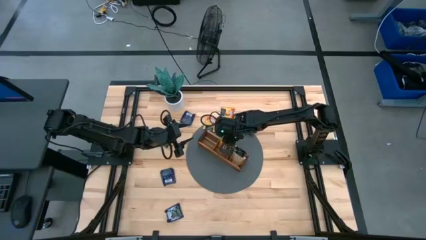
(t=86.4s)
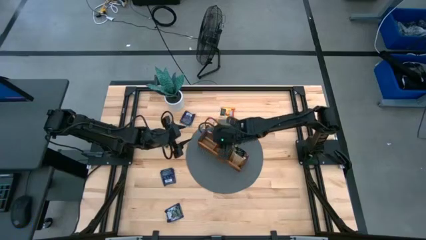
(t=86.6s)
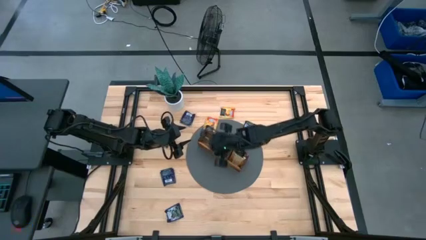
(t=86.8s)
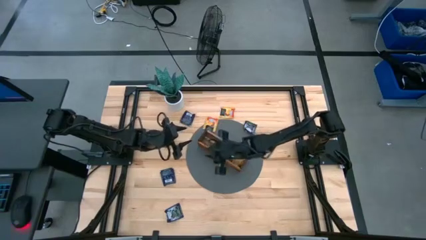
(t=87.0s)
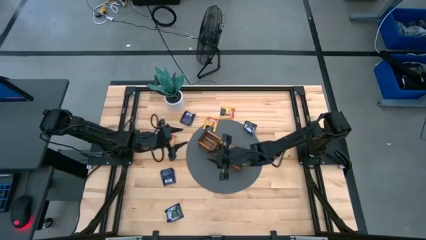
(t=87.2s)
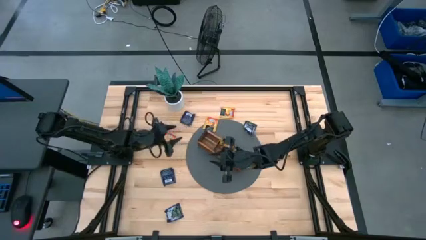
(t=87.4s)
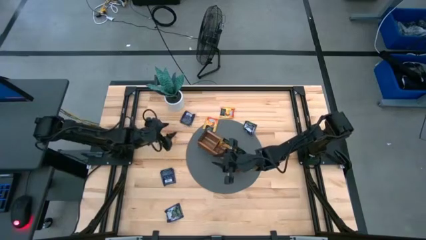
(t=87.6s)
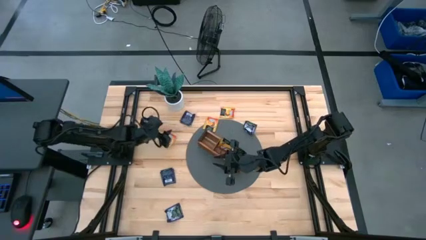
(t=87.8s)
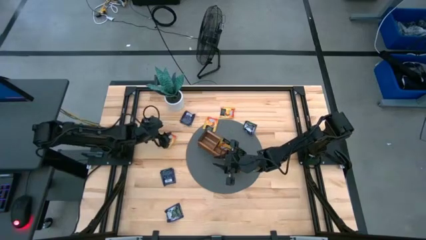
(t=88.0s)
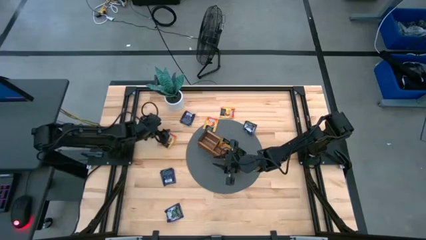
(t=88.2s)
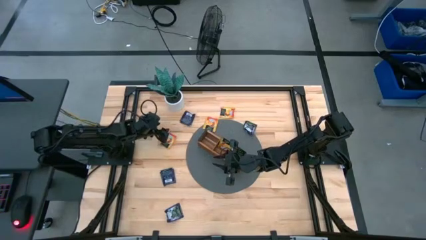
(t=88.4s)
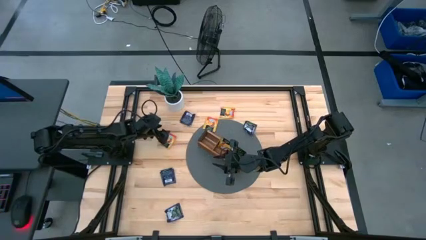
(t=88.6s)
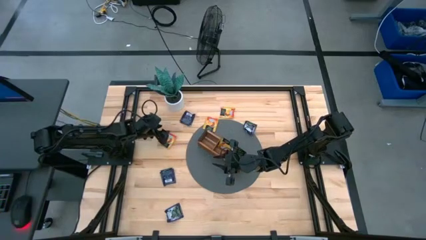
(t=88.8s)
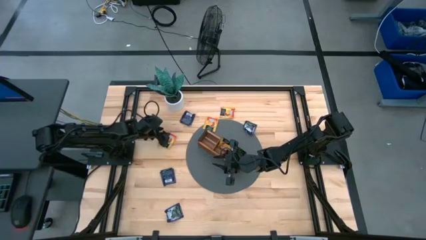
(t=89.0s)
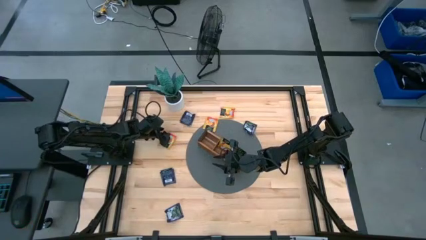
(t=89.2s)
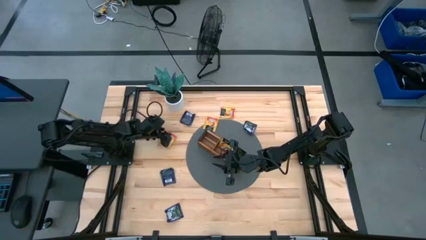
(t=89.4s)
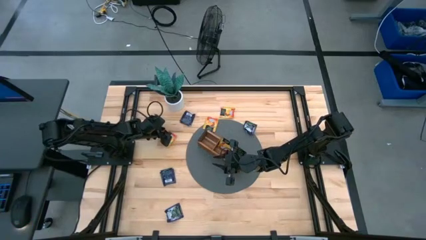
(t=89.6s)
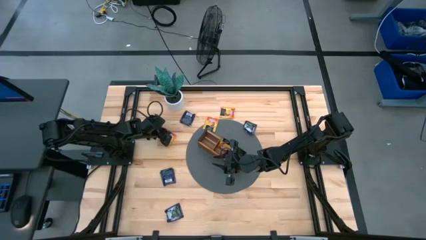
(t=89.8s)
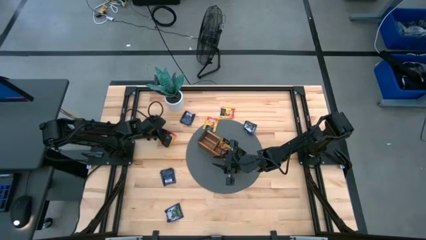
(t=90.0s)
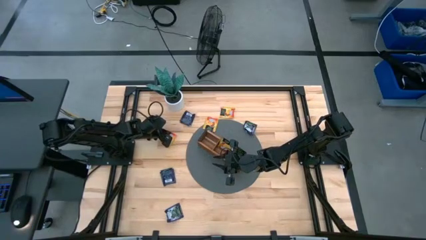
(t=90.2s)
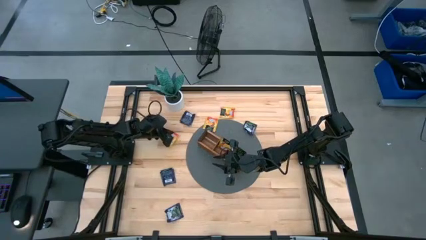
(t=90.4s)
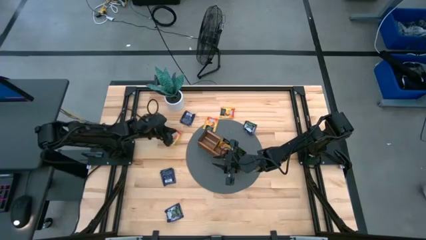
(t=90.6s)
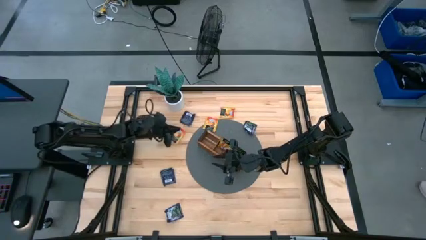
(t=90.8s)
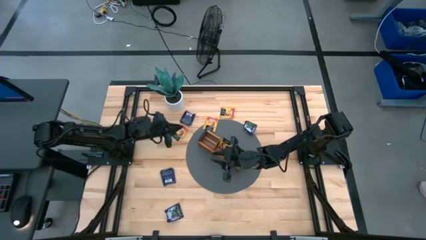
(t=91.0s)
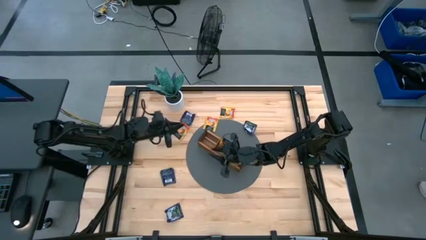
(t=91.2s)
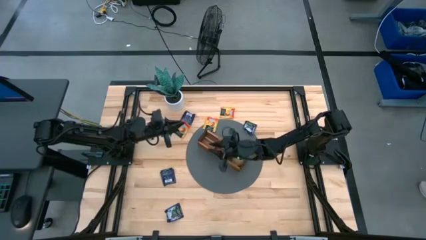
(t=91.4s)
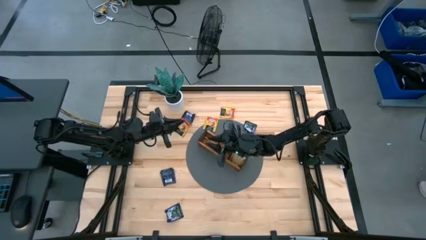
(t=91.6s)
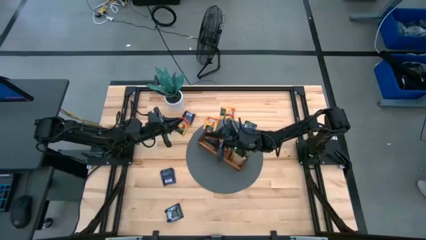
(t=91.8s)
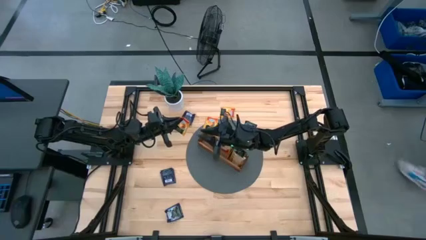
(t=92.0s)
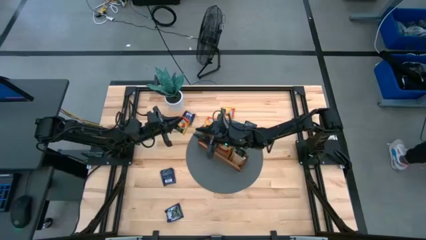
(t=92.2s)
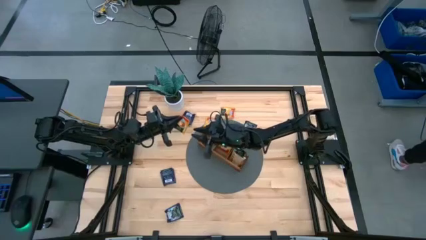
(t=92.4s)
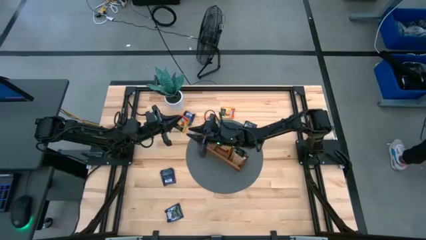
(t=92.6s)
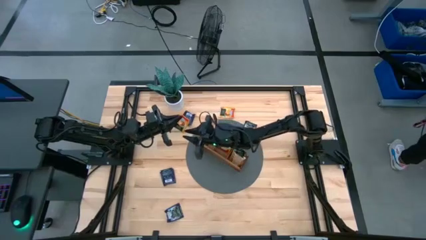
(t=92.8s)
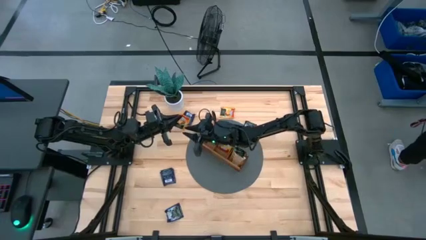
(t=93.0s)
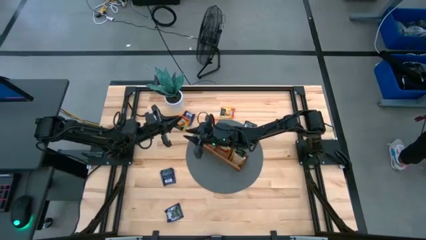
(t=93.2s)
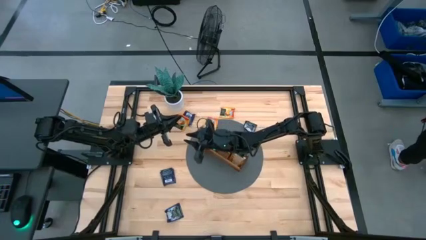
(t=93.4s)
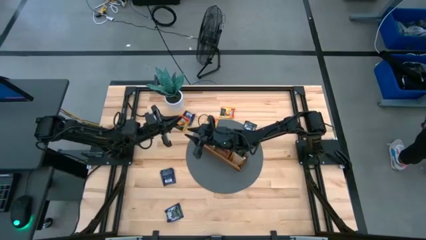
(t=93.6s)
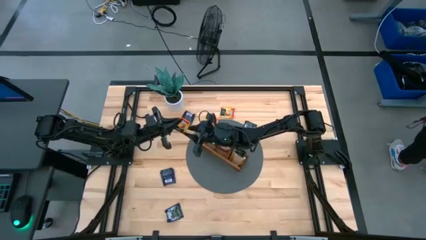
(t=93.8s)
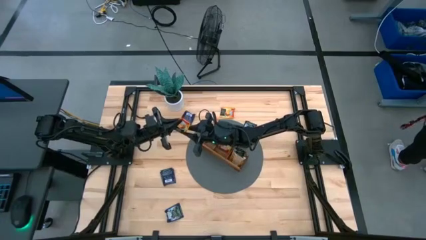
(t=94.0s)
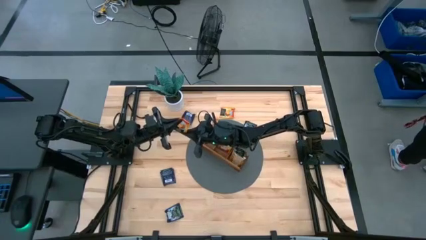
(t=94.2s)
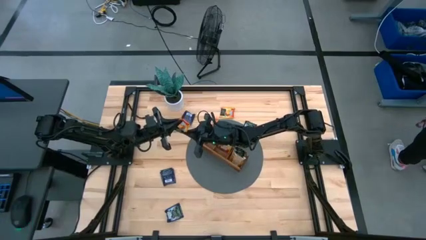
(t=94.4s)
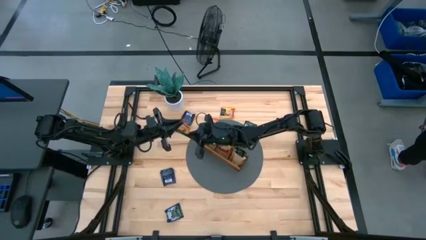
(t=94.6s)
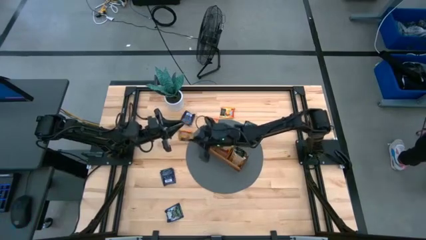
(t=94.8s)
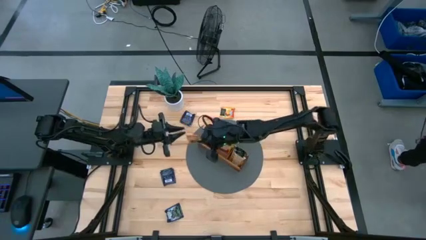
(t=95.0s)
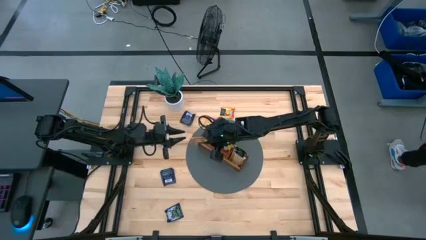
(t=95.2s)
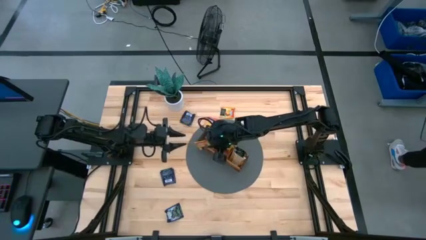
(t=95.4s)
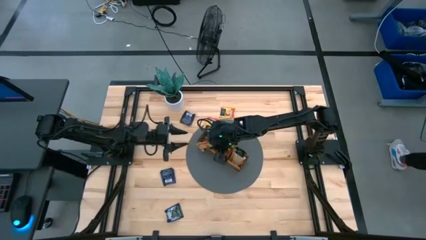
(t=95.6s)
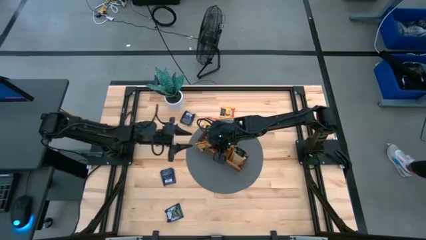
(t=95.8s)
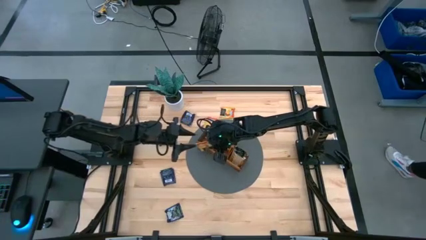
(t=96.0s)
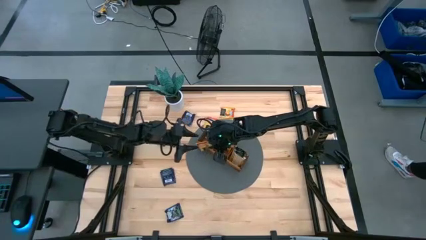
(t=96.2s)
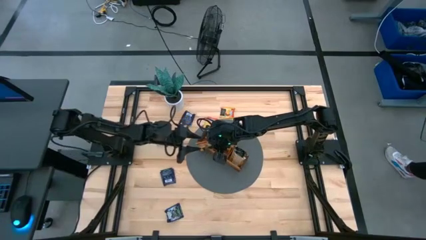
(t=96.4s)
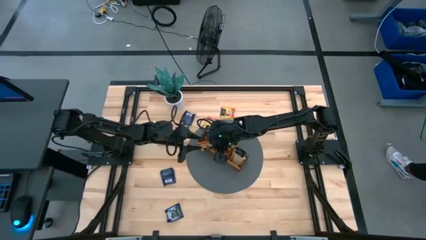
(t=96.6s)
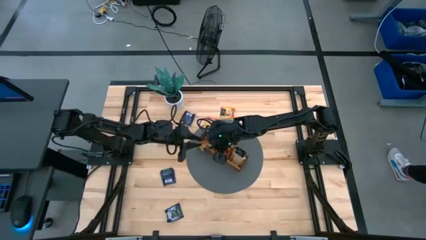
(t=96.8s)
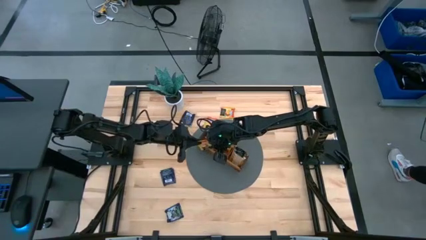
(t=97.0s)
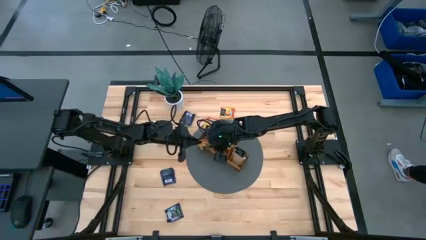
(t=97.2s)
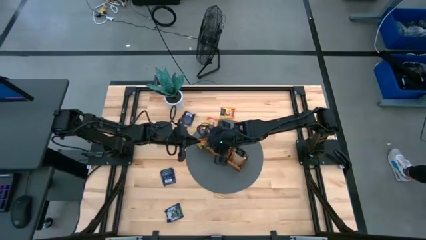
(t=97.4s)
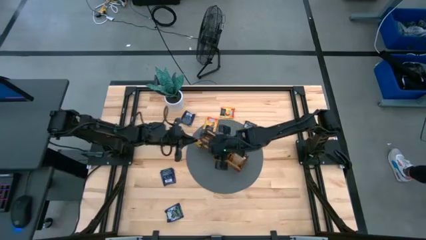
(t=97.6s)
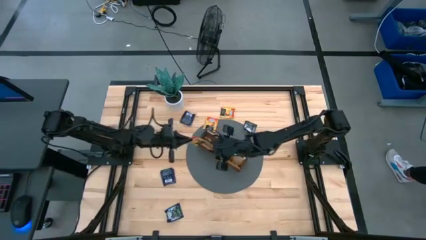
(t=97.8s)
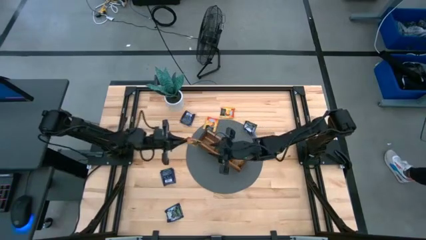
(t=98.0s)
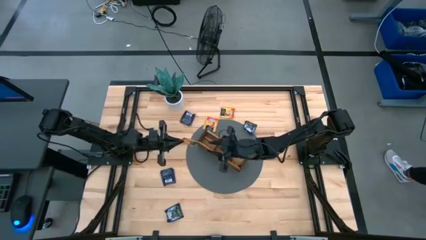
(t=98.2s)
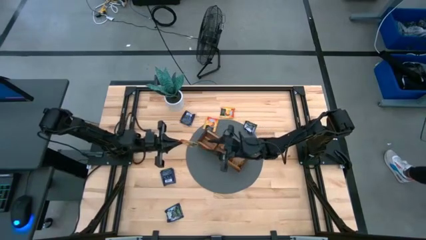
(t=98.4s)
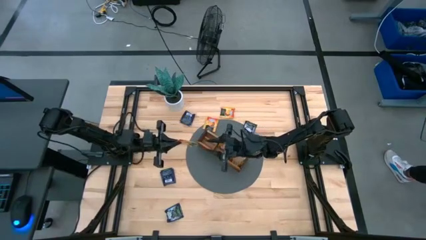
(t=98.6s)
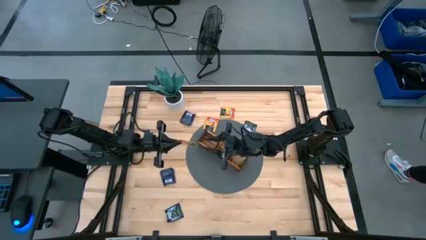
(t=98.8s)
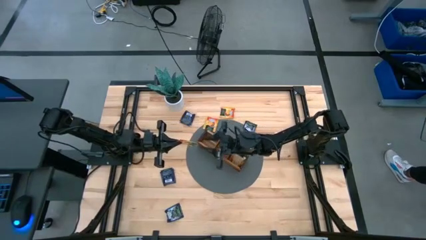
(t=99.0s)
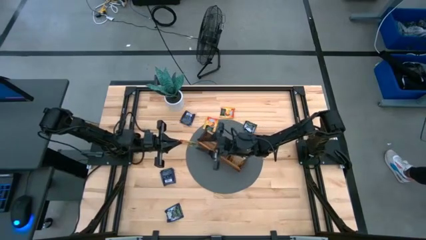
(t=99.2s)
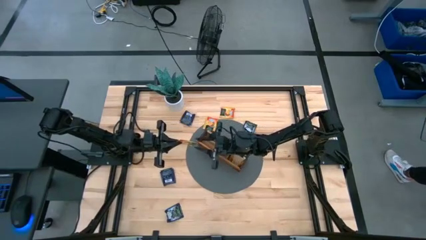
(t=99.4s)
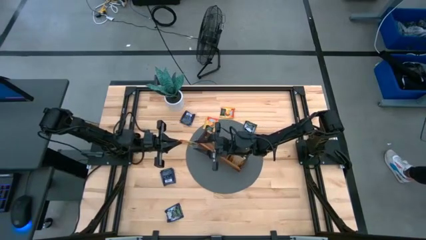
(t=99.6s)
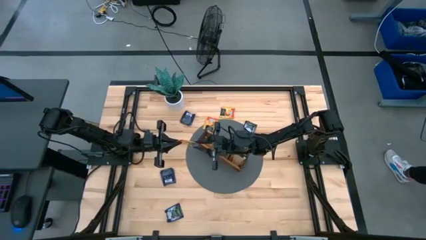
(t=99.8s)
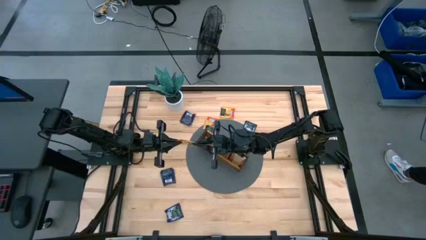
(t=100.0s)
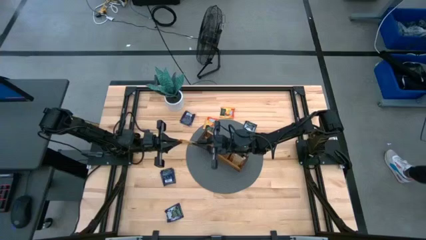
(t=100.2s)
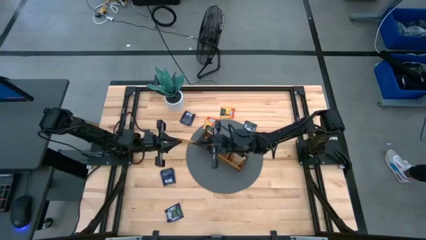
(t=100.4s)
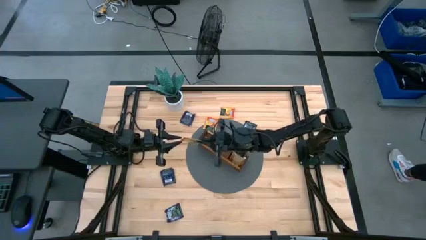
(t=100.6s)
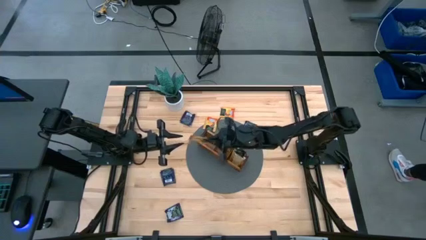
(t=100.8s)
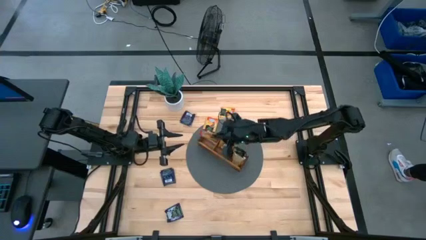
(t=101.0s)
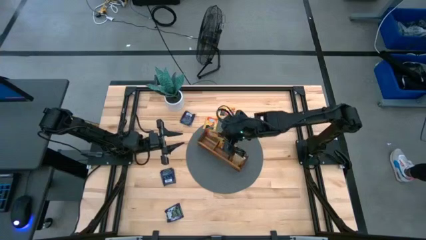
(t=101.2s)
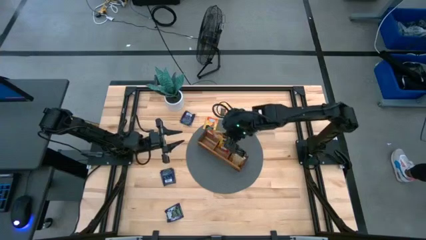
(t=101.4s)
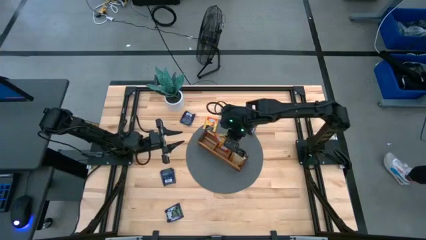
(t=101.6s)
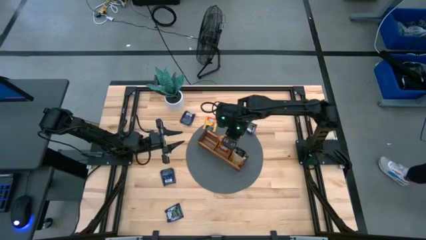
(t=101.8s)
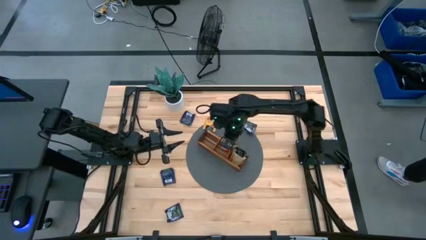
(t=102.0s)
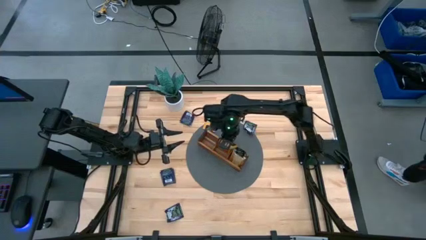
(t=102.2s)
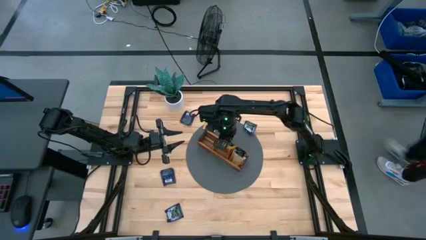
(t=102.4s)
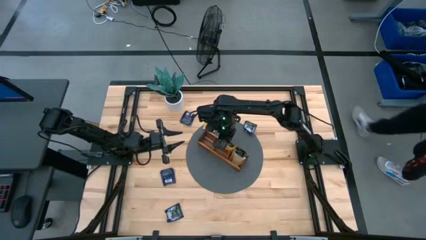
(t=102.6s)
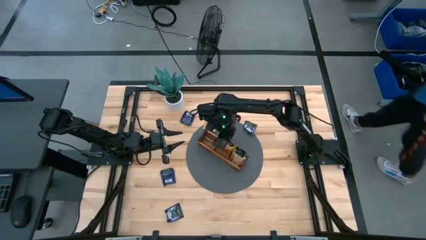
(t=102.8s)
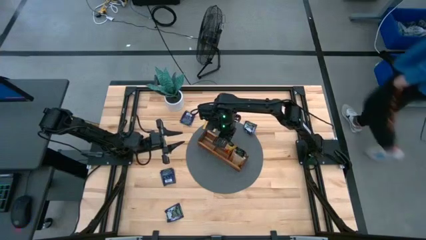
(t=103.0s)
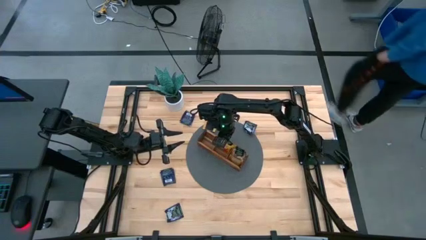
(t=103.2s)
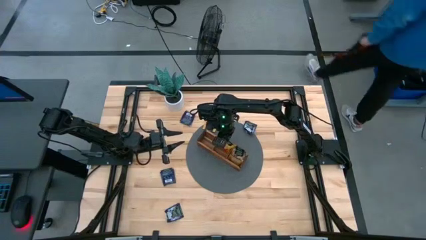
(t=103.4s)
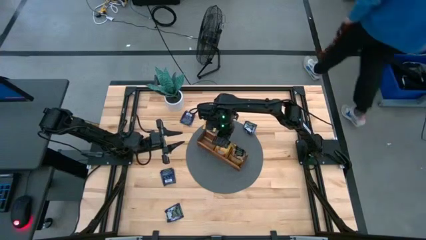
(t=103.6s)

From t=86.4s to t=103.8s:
Task: Pick & Place Tea
Put the orange tea bag into the middle section of the wooden organizer
